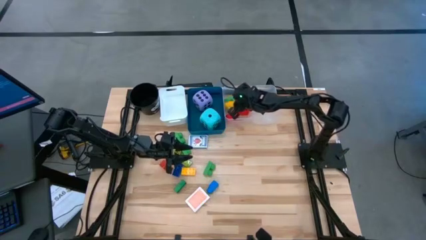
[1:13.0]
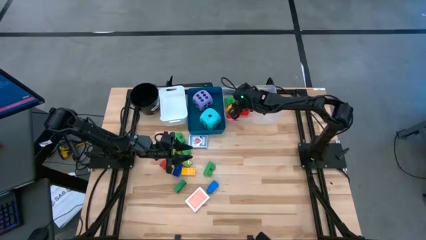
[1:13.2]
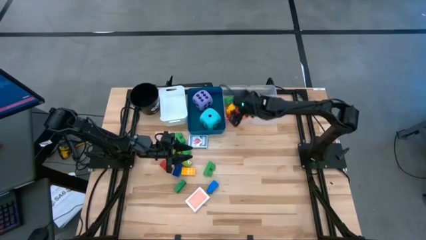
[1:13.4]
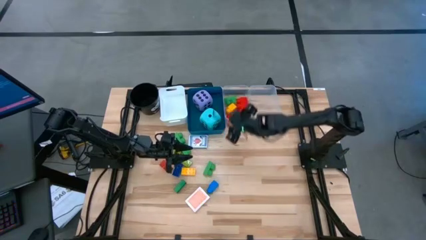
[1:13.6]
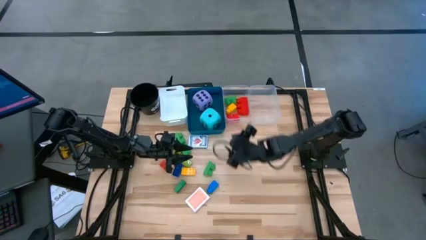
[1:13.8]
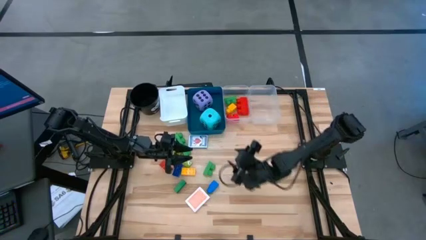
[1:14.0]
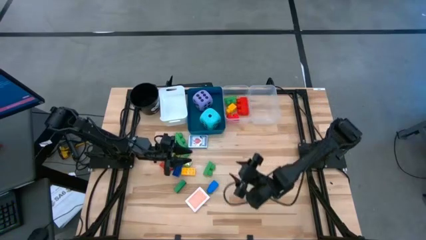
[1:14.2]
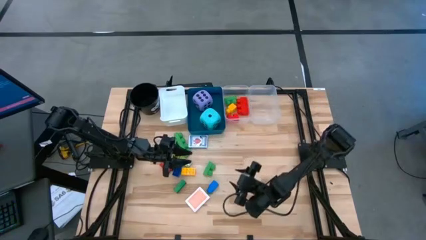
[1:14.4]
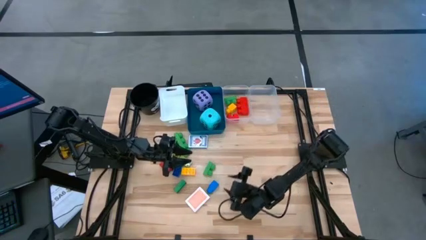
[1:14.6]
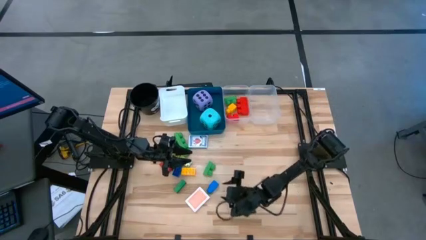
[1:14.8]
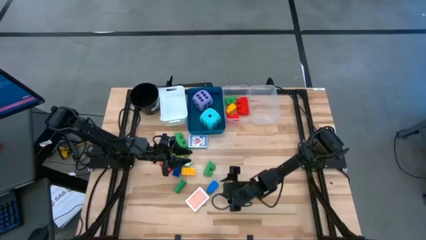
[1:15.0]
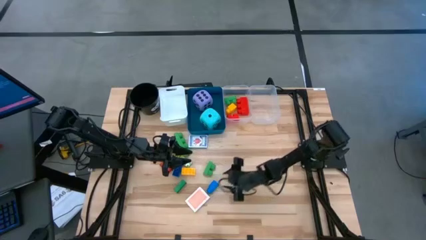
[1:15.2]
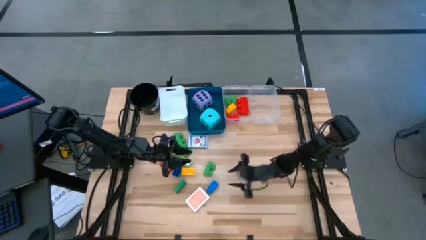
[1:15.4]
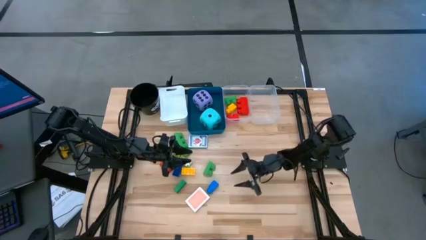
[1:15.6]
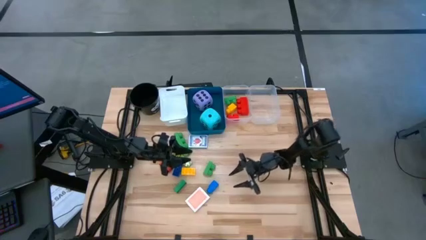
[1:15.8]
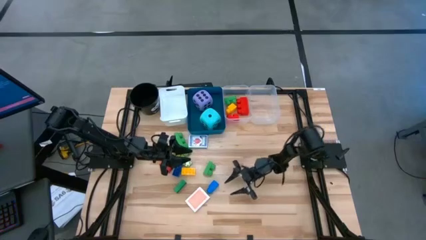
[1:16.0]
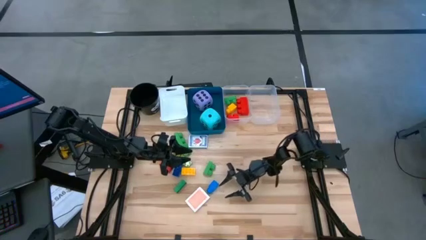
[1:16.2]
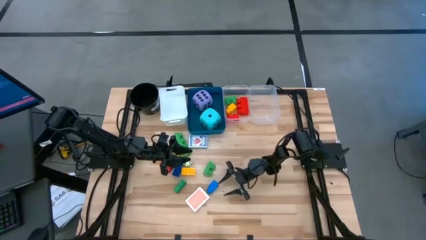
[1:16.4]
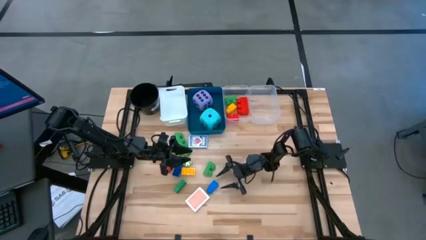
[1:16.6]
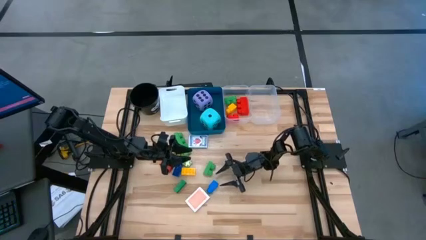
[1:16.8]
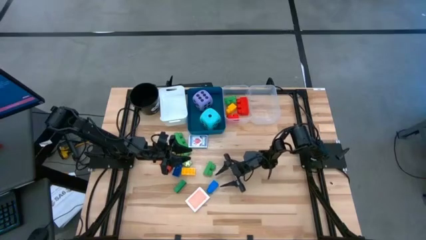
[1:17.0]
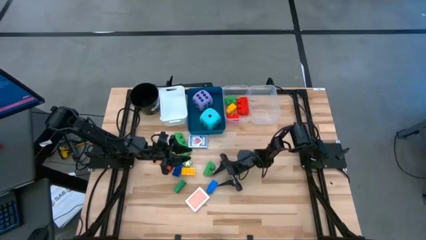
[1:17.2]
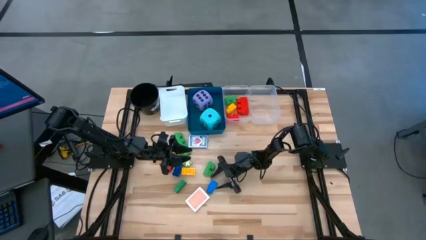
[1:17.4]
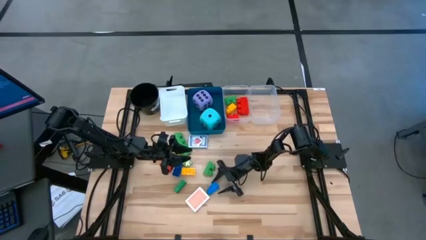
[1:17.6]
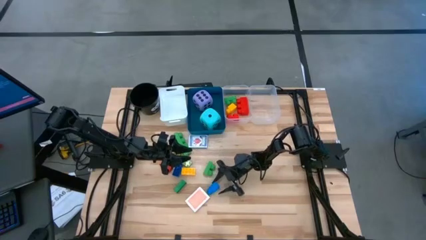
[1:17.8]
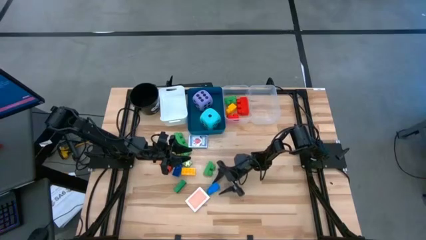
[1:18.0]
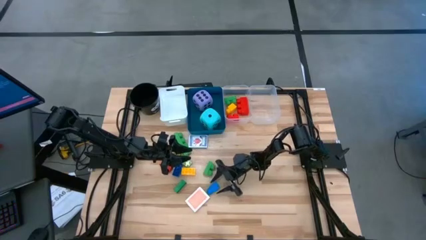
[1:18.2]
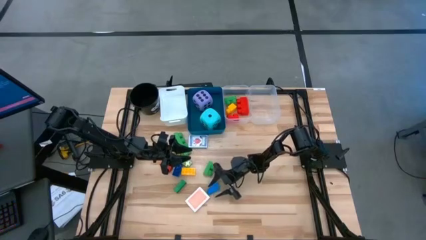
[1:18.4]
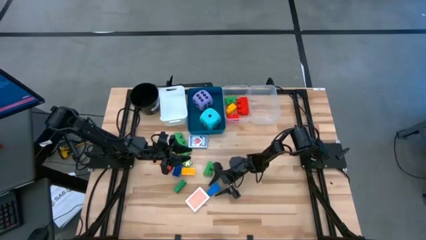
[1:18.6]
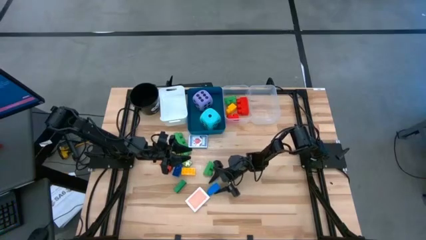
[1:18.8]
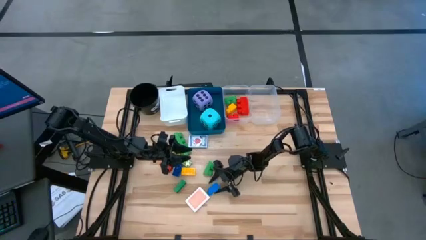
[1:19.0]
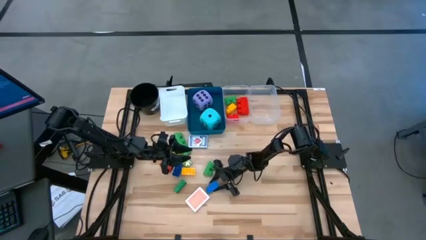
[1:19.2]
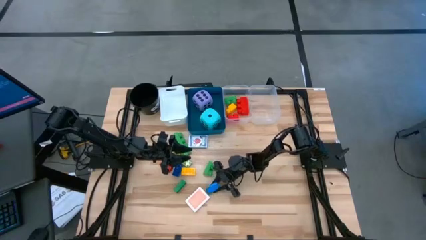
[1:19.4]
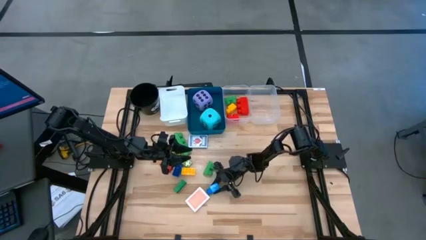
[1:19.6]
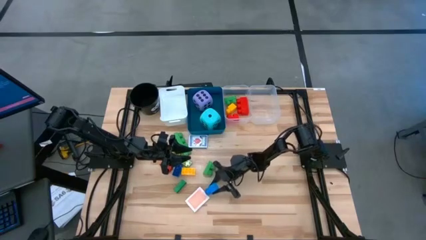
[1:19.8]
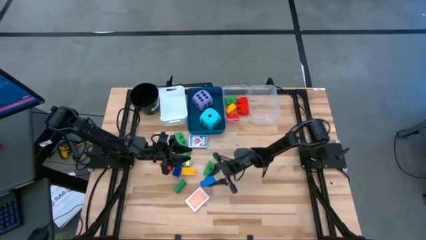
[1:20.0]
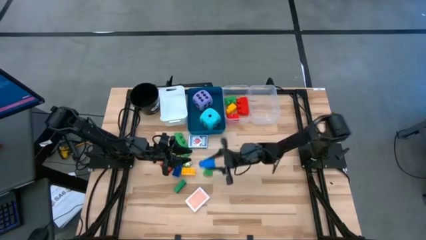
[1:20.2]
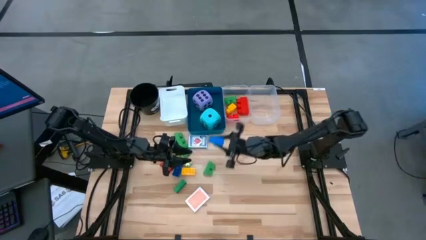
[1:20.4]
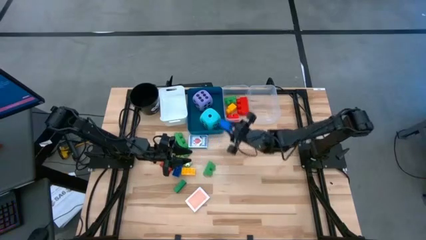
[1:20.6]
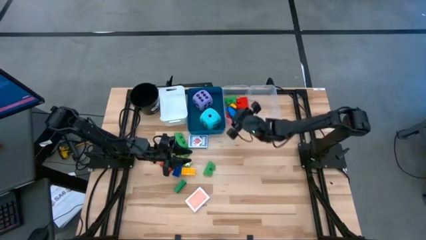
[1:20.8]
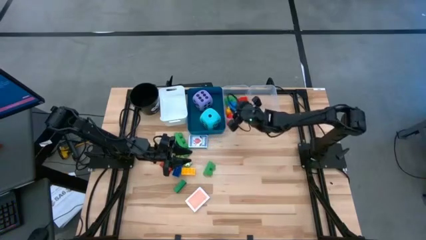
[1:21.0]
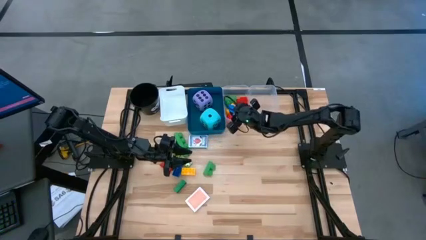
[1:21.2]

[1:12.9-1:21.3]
Task: Pick & Place Toys
Put the blue 1 stud game piece into the left transparent bin

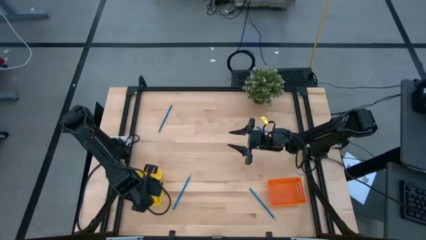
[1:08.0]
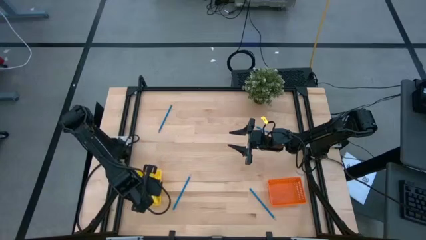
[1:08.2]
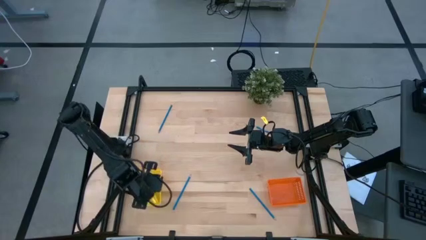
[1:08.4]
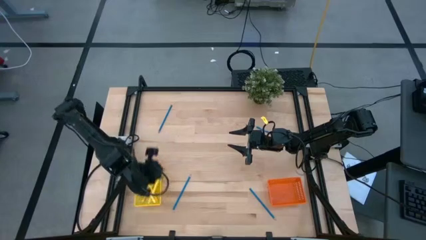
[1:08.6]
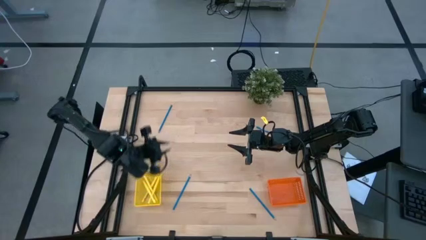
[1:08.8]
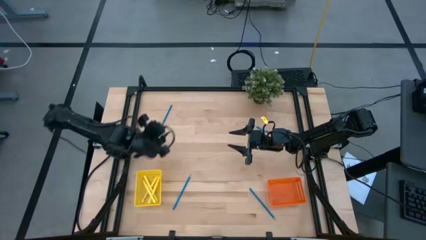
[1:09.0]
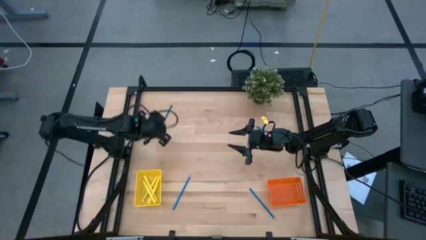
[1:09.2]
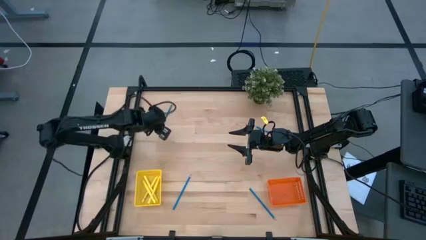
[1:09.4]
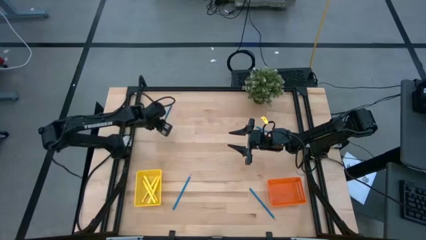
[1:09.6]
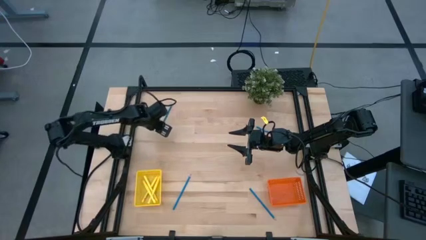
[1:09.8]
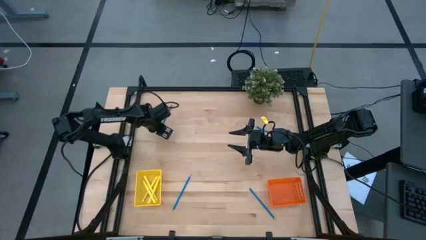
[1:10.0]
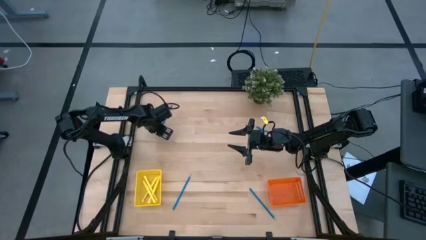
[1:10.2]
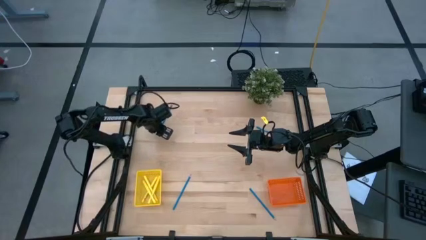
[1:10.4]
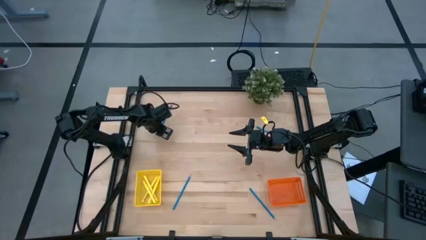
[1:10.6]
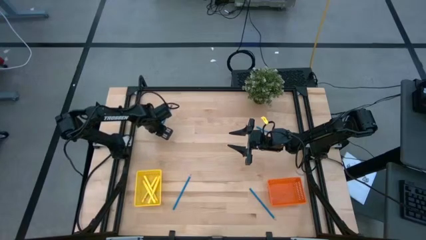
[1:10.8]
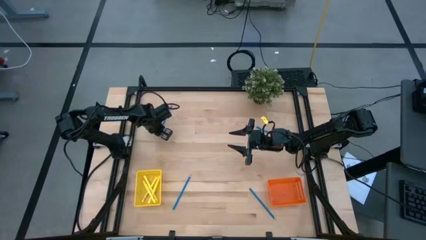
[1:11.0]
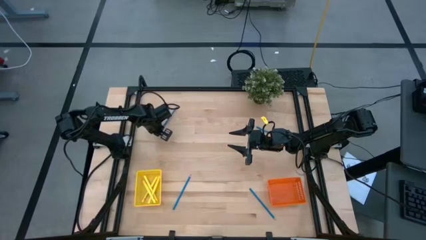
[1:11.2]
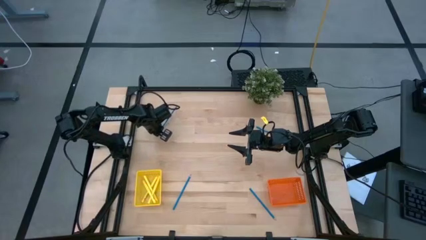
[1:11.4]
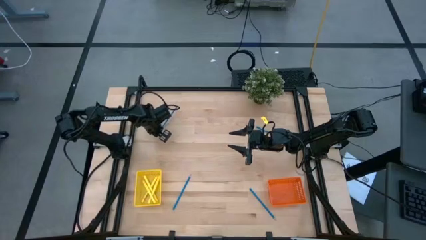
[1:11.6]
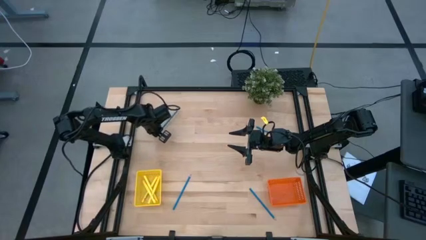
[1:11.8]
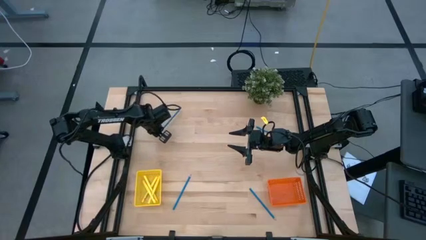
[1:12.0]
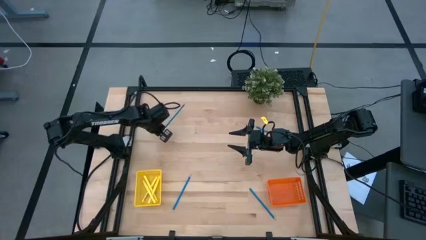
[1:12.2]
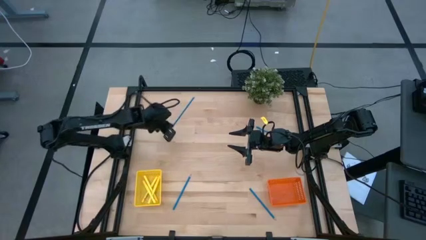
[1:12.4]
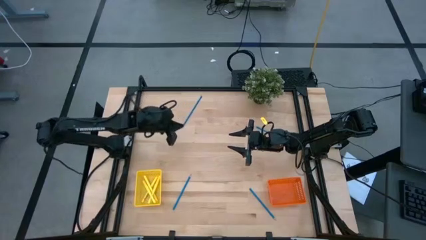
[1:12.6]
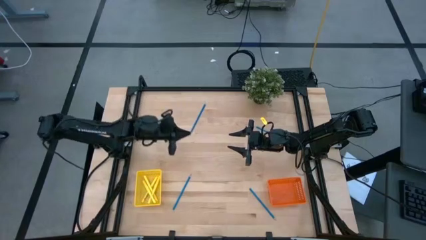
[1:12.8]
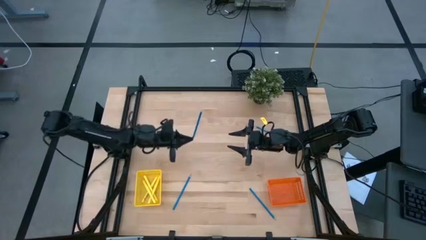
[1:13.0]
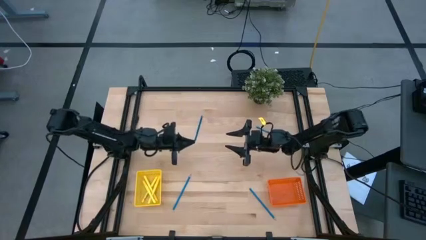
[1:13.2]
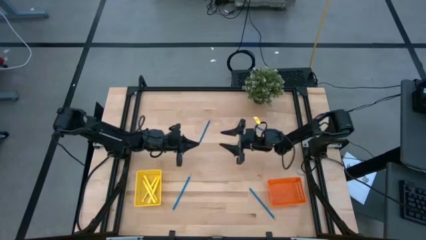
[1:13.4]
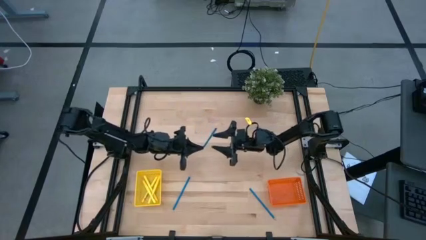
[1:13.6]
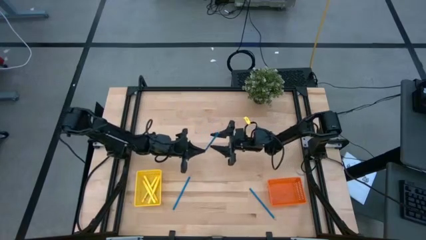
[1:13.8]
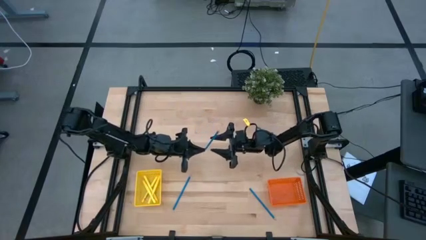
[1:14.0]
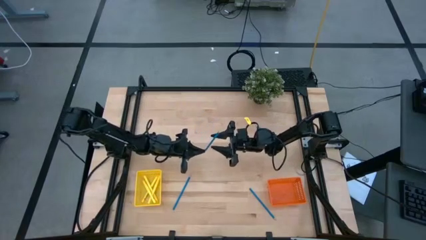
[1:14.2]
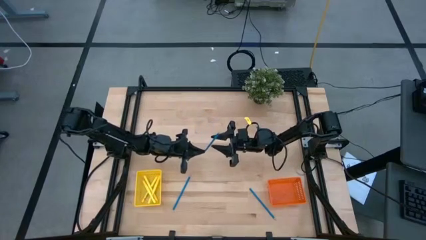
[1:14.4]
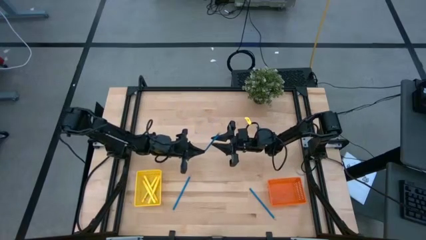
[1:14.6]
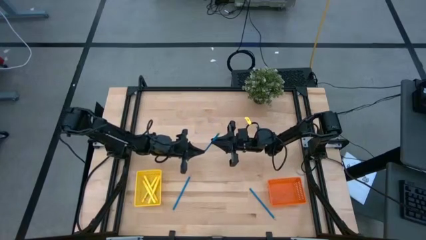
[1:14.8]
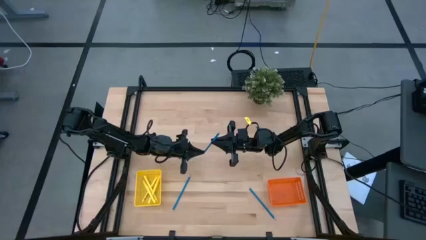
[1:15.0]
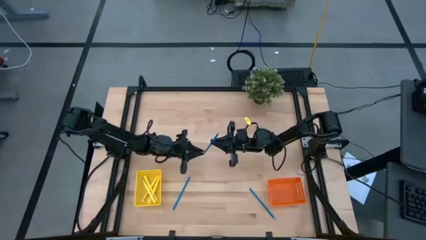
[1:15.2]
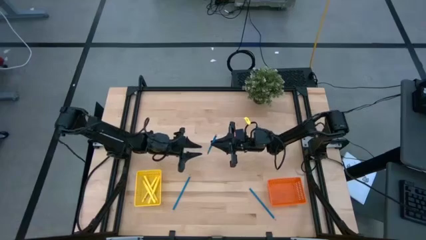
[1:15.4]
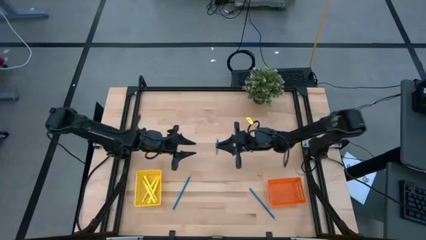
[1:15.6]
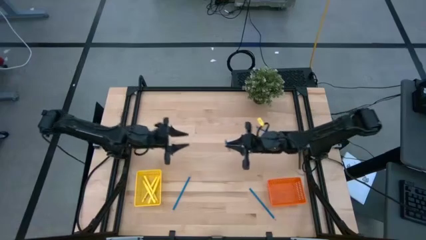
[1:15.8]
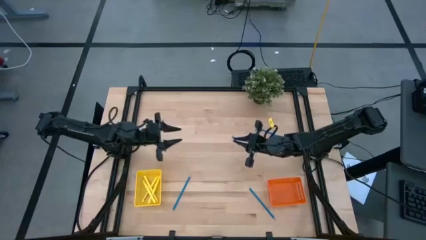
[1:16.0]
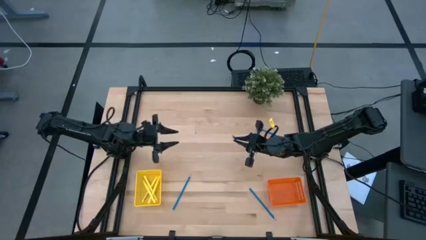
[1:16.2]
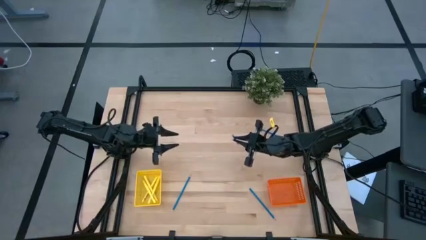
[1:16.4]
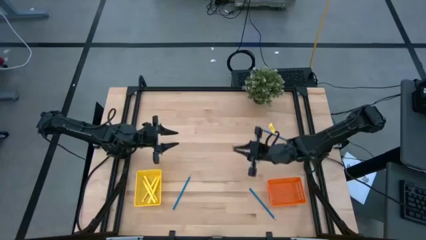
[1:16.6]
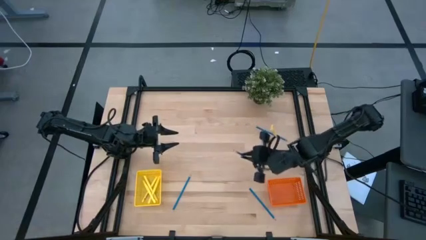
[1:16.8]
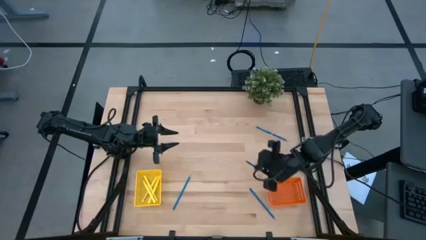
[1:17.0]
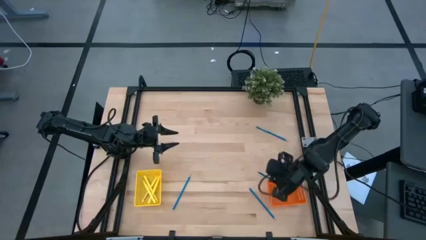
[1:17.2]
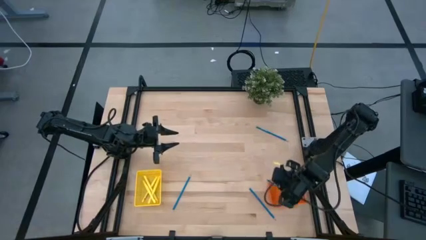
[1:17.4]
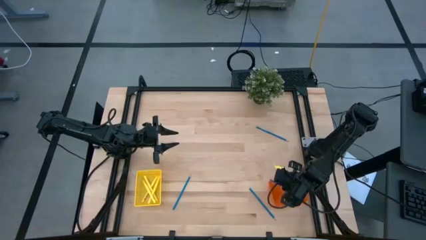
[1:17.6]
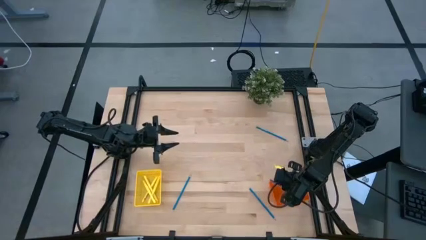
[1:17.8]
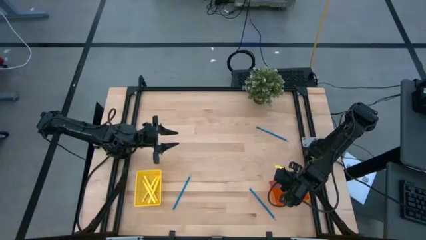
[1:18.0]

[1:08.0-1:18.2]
Task: Sort pens & pencils
Put the top left blue pencil into the orange bin
